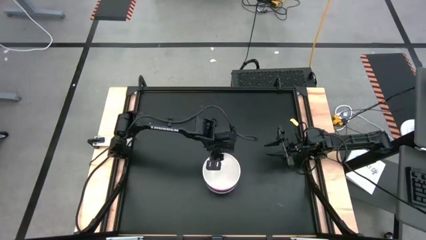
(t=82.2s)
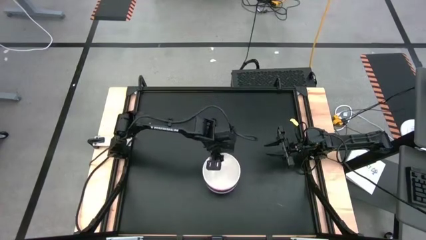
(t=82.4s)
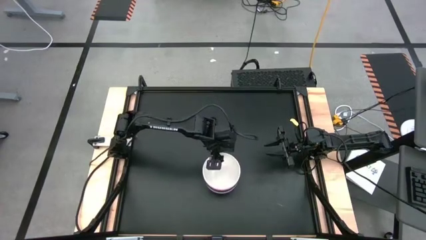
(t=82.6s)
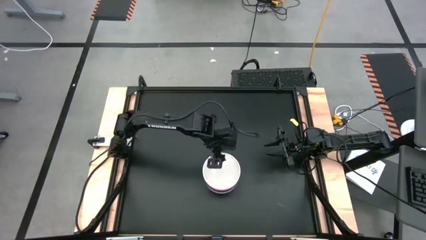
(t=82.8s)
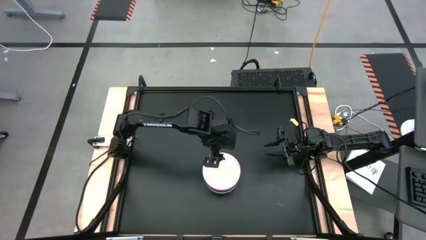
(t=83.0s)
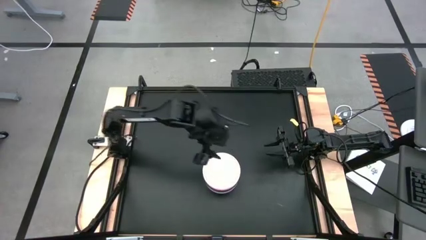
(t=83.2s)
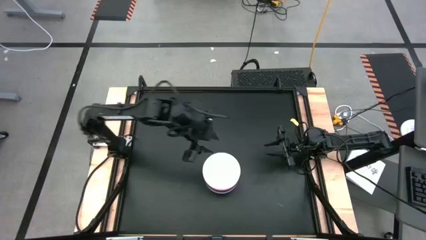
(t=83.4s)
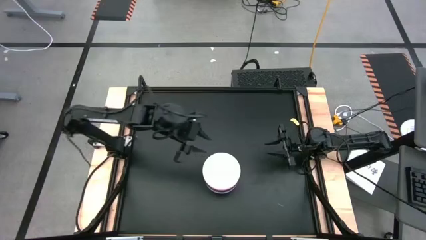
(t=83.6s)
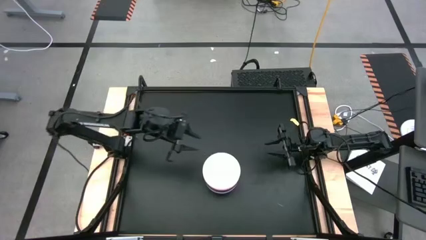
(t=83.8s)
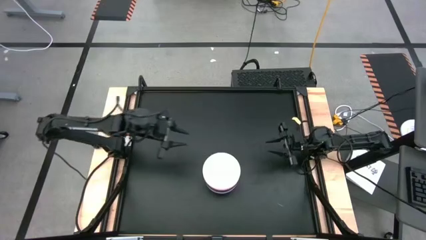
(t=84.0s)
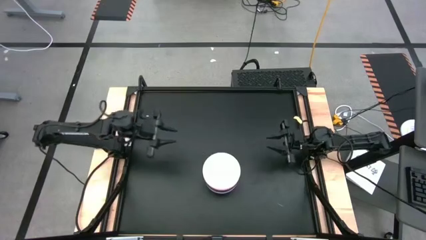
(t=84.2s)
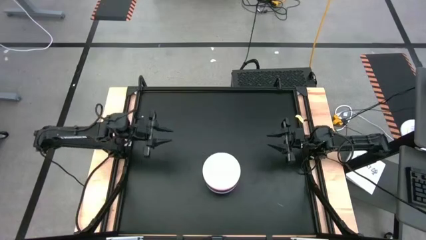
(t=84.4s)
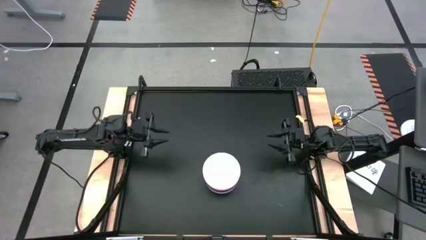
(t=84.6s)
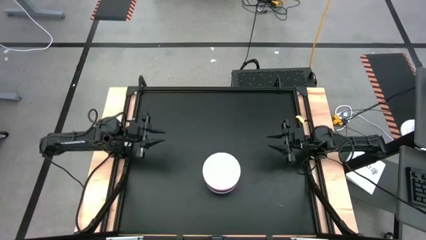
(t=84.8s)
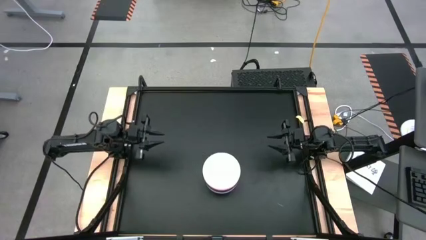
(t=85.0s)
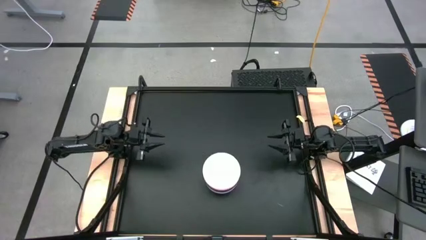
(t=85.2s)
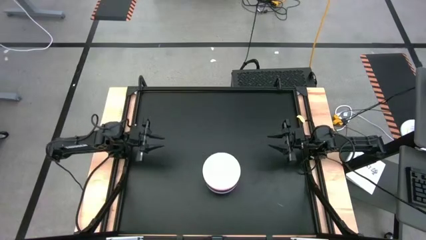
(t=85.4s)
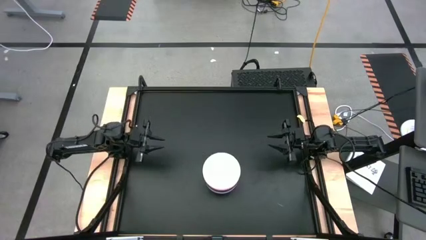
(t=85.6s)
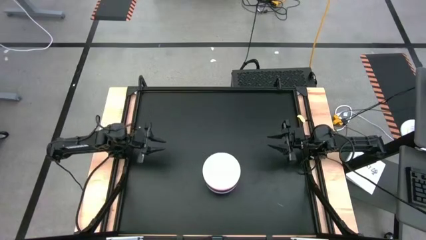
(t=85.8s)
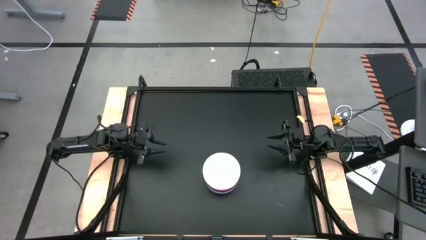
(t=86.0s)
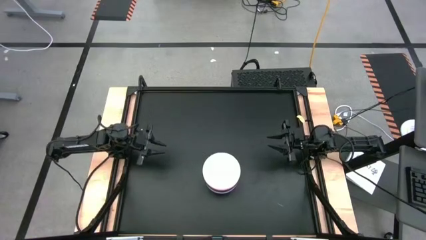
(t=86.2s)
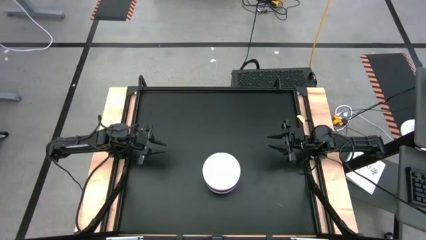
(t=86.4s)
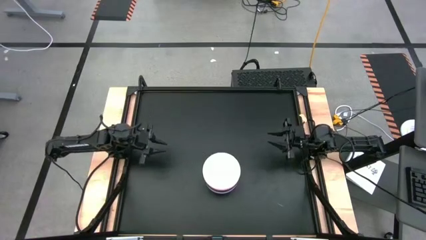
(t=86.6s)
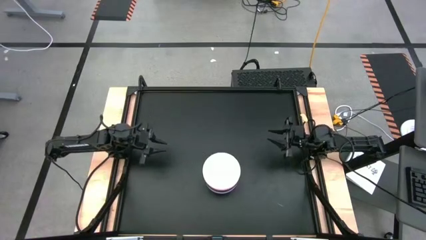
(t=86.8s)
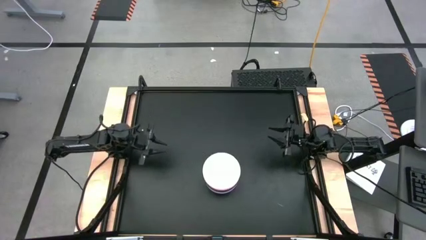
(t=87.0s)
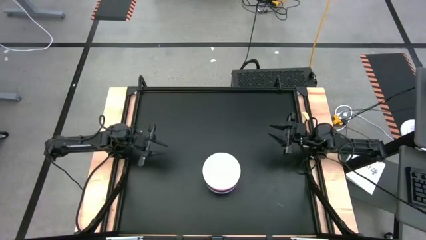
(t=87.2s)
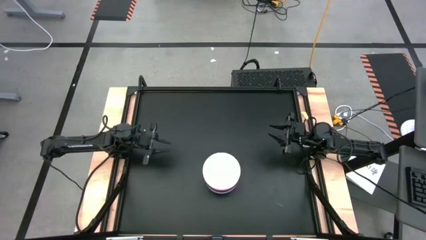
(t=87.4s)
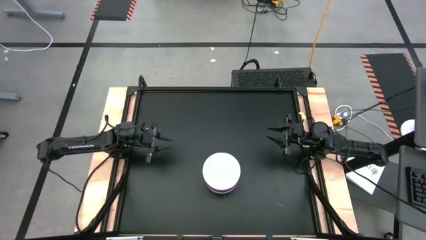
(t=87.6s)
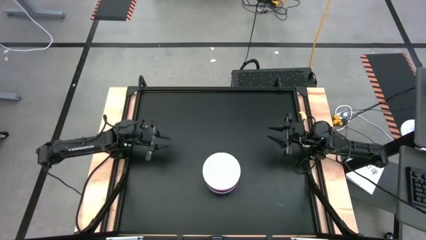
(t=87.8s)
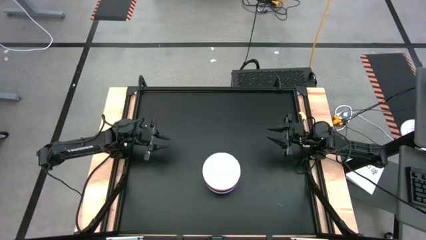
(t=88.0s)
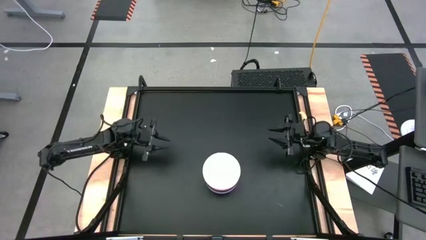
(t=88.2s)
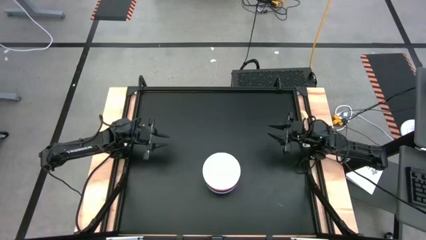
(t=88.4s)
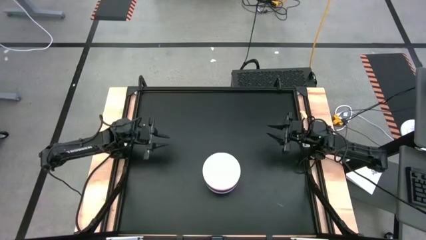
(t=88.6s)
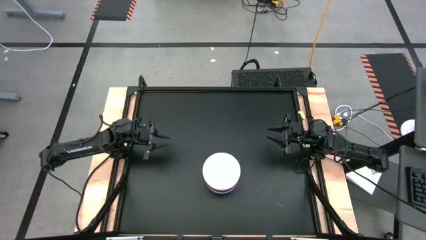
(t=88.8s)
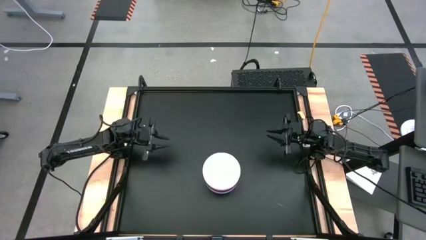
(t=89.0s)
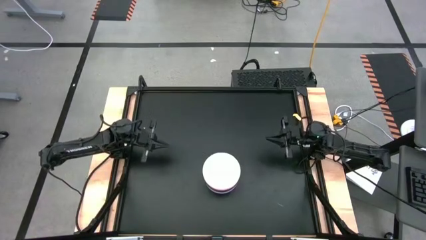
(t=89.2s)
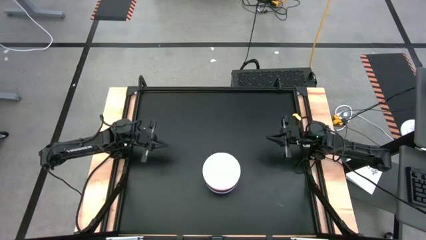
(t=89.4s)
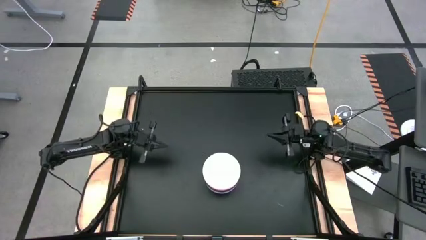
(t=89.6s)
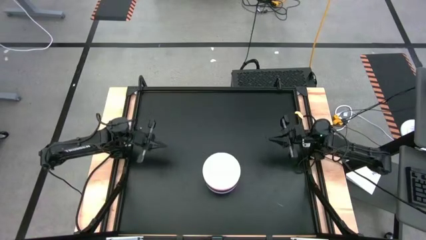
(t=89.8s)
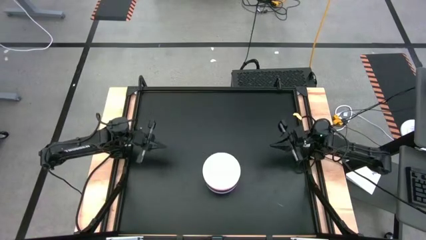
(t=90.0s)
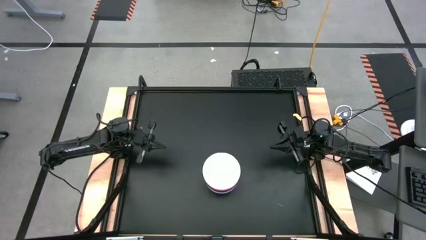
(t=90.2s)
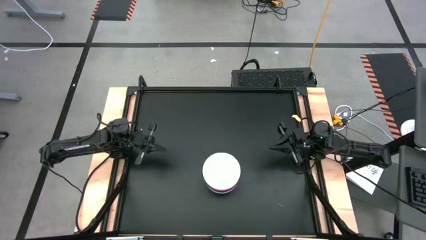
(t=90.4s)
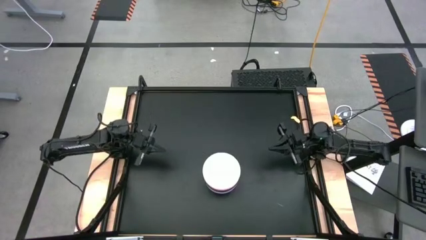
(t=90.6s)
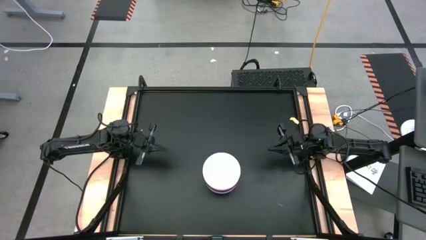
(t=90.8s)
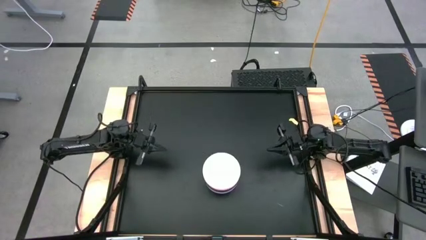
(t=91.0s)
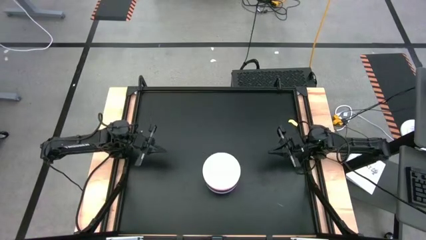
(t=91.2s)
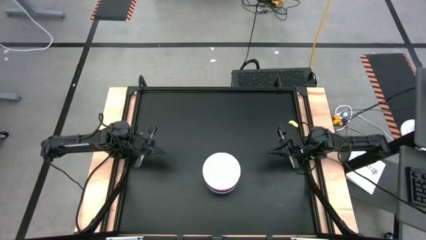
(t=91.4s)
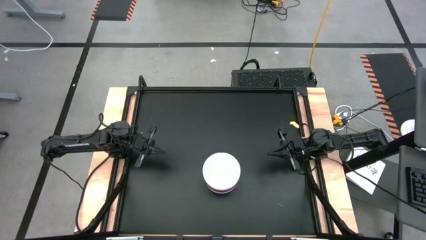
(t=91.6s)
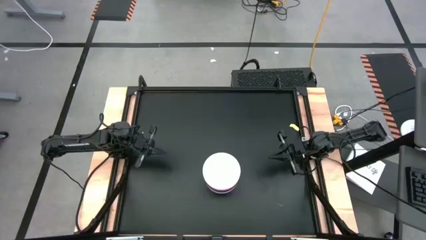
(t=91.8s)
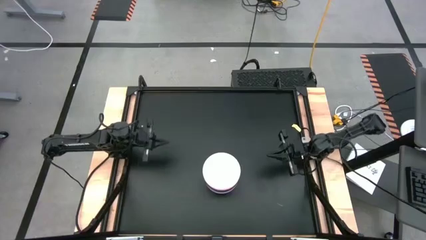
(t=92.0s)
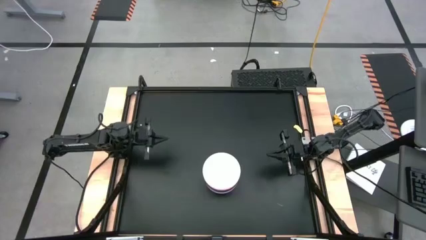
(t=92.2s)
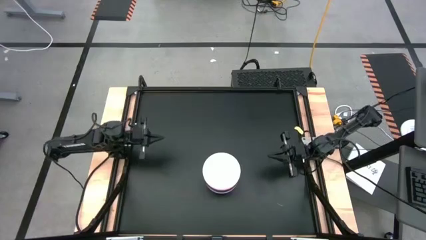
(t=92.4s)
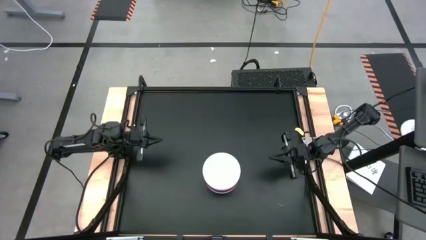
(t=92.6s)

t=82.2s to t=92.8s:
Task: Nest bowls inside each other
Return to Home Position

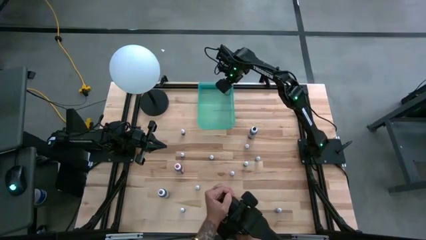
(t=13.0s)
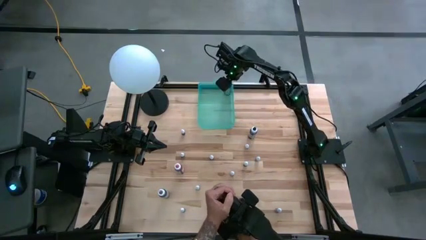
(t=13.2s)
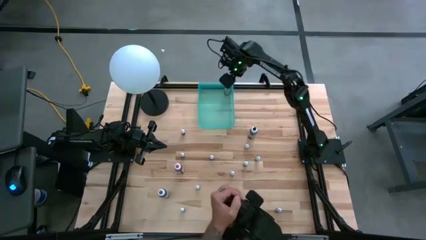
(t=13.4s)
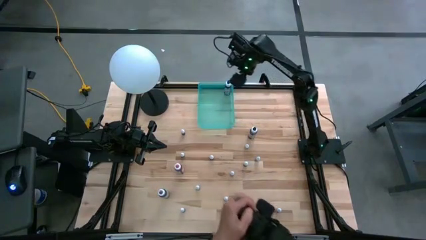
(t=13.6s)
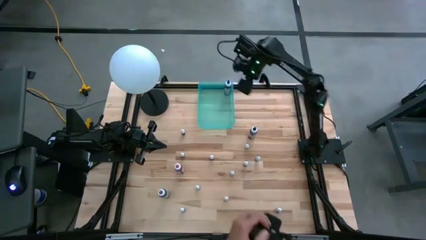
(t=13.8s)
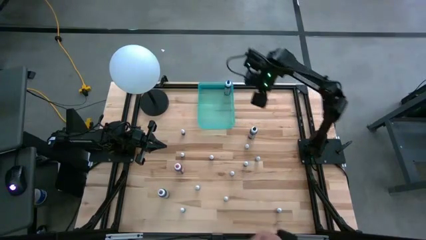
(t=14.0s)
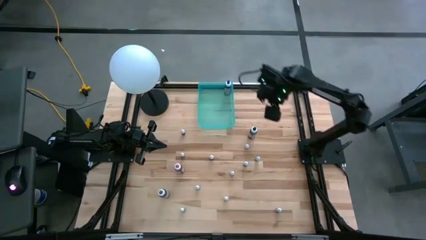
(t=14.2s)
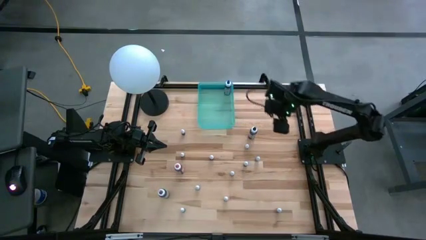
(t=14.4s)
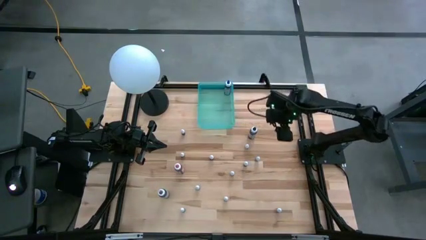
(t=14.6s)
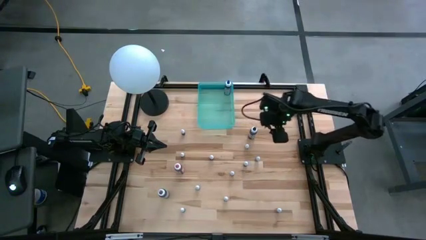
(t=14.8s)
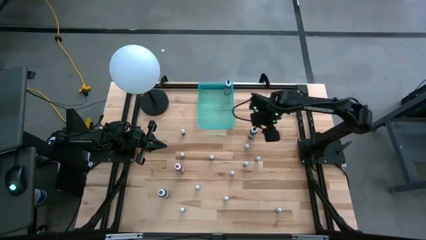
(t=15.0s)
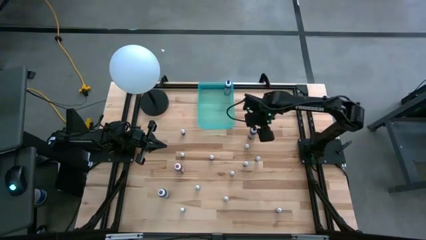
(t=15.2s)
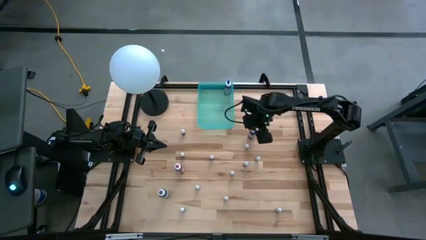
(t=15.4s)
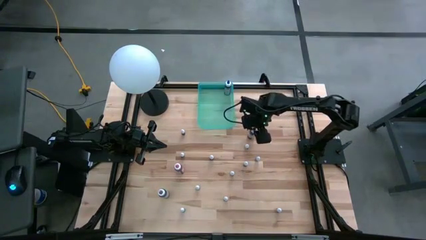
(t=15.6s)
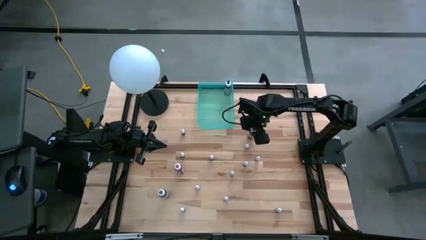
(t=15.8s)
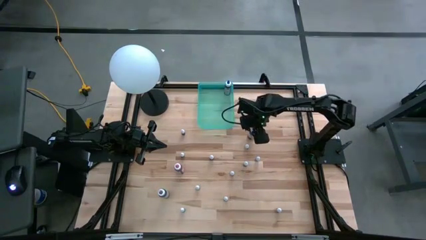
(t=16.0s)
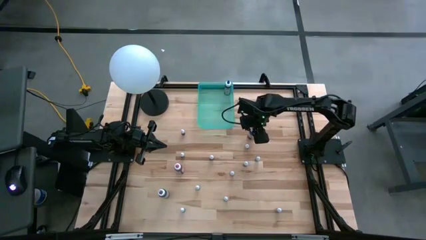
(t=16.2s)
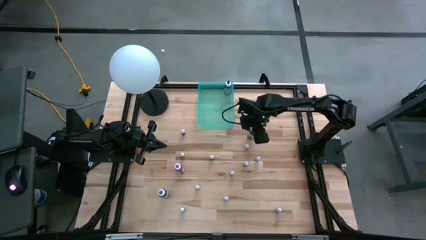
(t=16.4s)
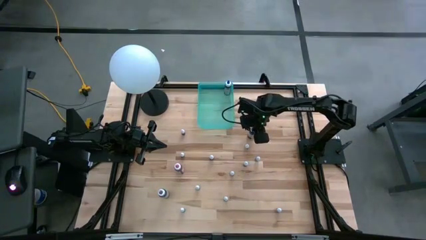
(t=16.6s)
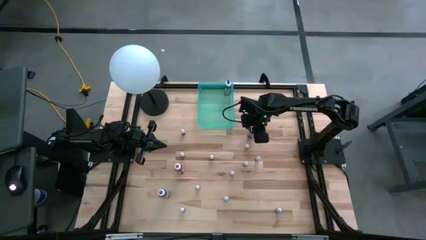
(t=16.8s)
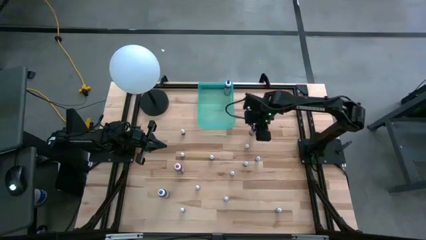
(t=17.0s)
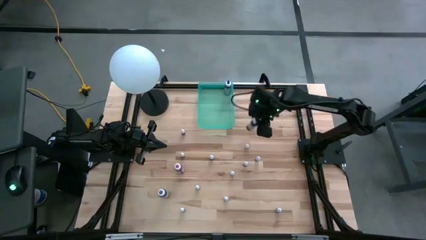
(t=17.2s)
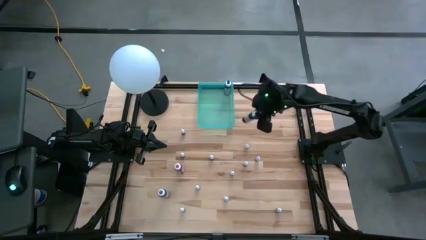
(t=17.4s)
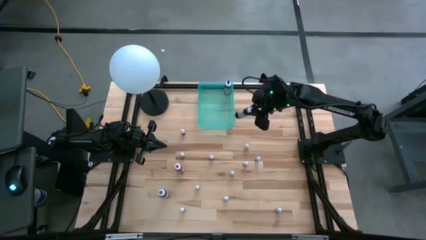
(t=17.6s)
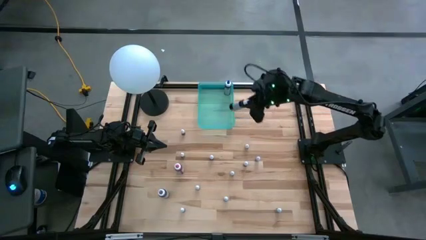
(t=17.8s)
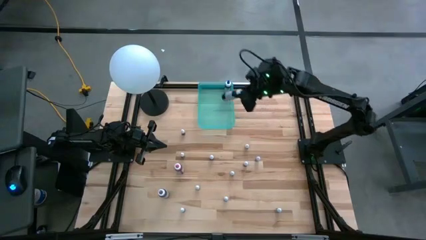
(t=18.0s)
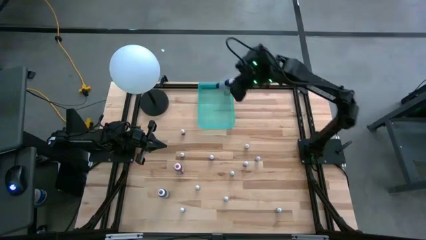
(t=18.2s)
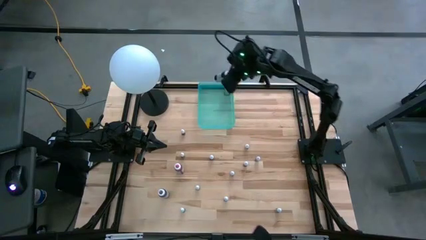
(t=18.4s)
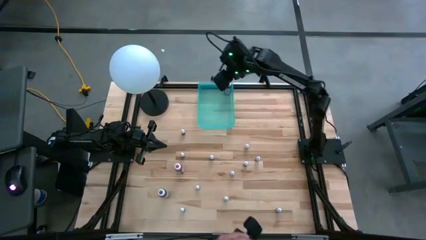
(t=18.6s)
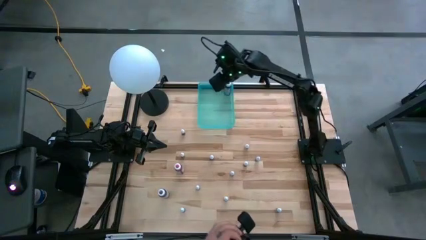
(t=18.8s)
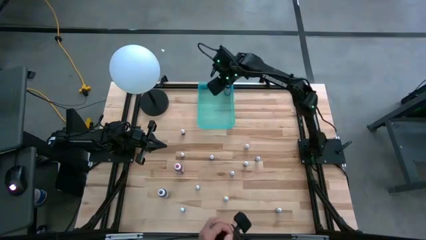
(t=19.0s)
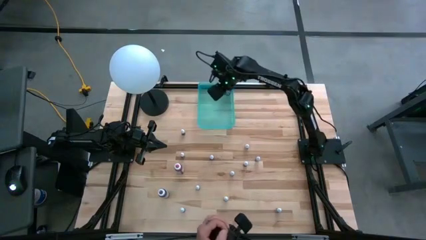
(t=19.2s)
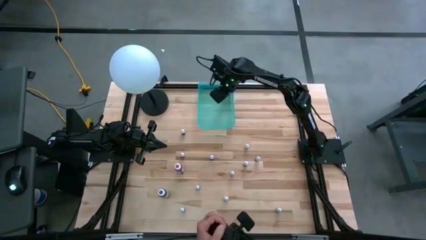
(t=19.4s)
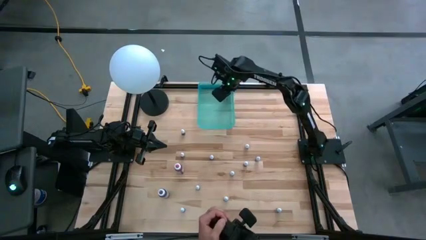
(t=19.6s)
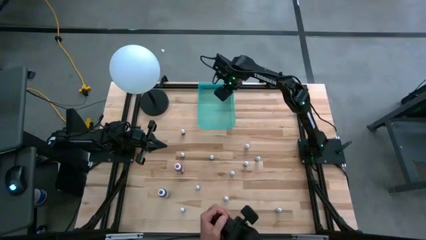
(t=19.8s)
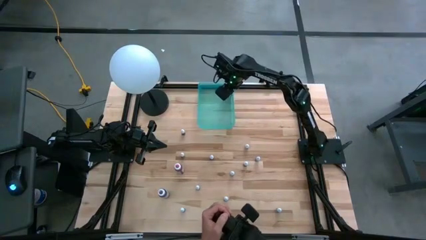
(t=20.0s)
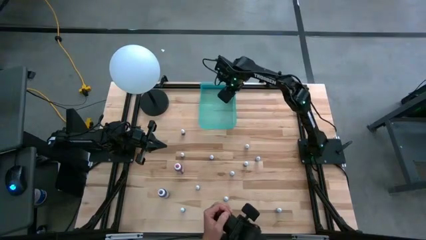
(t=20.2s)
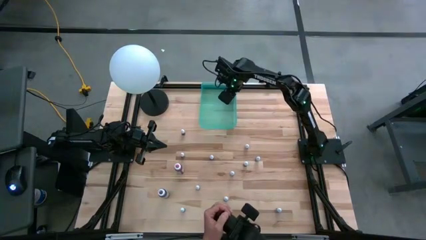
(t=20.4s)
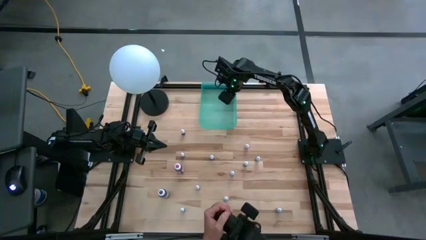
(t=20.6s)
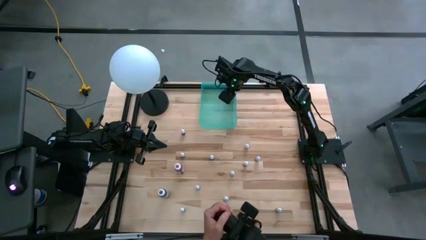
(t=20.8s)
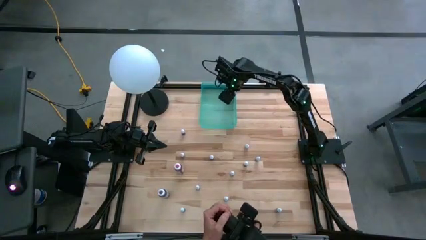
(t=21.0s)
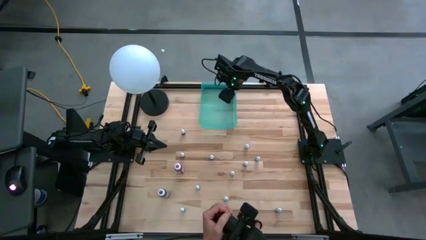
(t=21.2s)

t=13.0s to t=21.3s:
Task: Pick & Place food coloring
Put the large black food coloring bottle into the light blue bin
